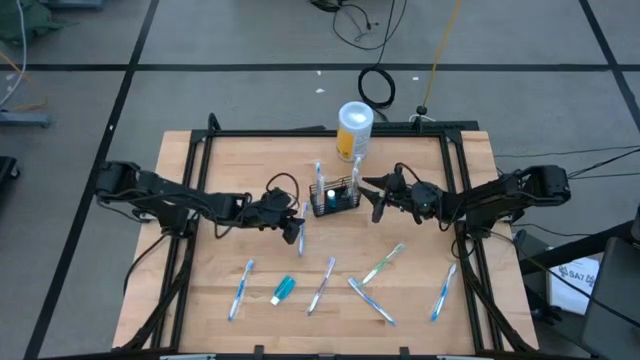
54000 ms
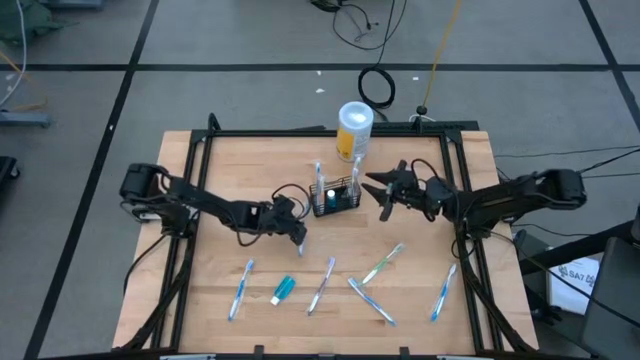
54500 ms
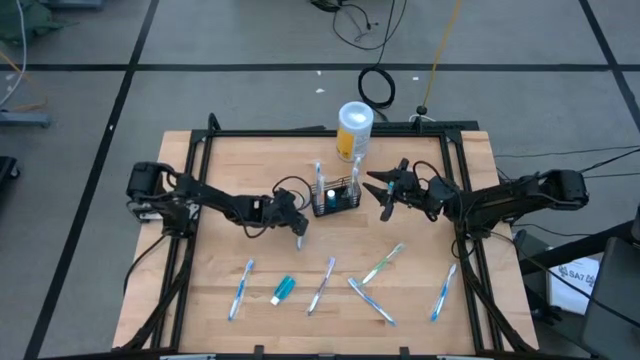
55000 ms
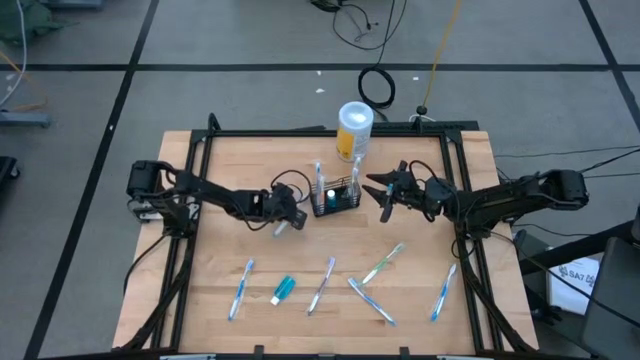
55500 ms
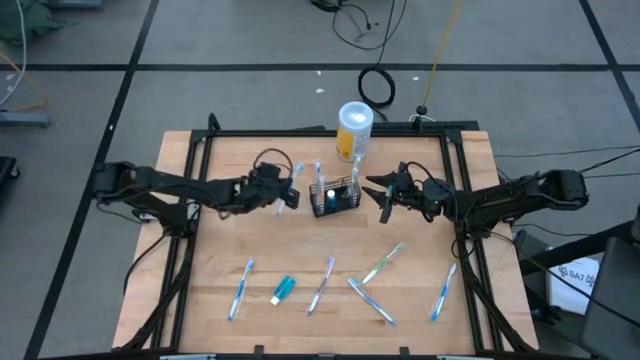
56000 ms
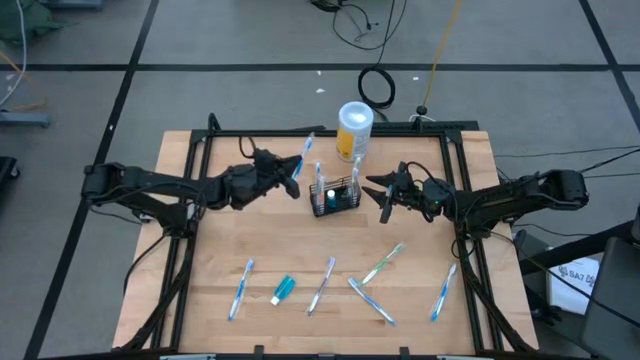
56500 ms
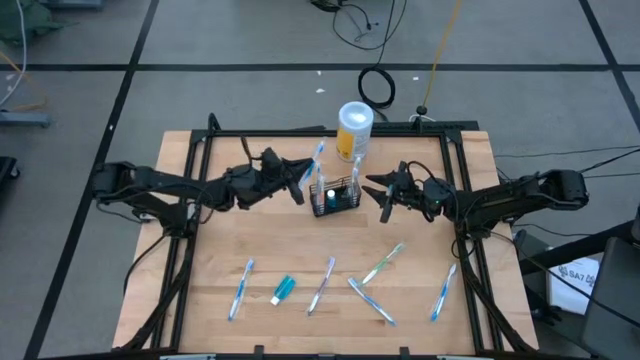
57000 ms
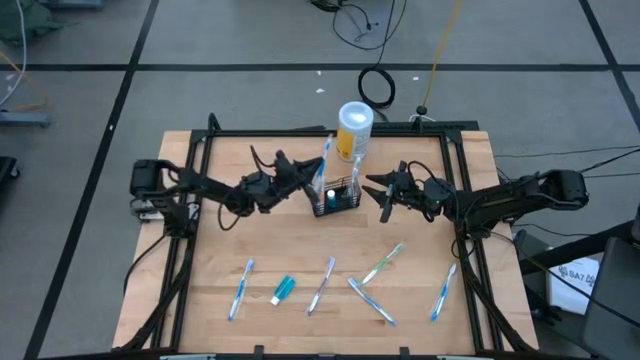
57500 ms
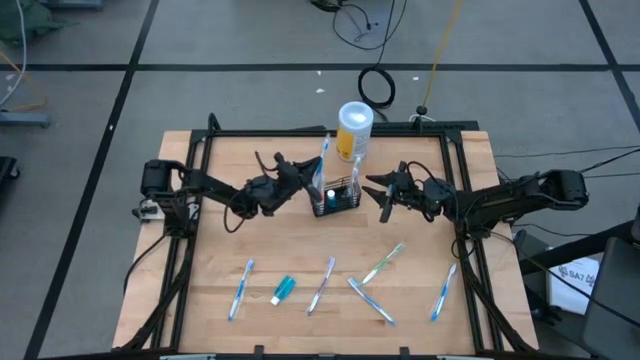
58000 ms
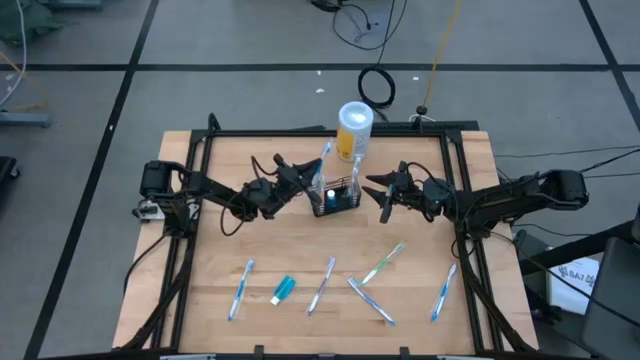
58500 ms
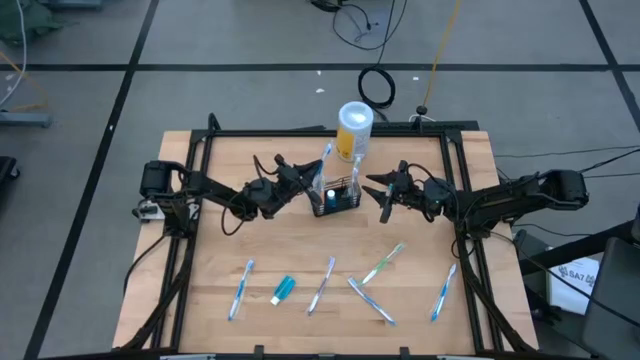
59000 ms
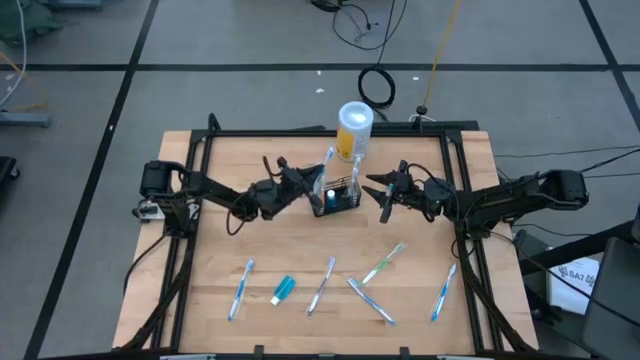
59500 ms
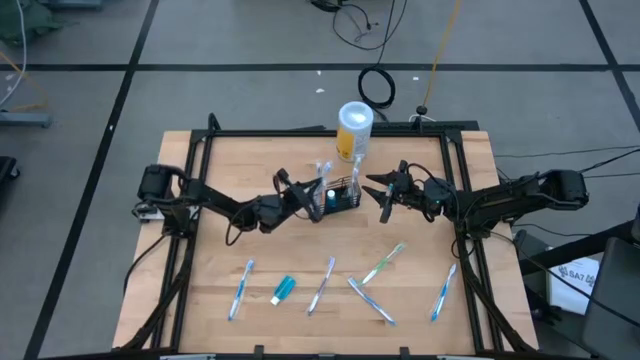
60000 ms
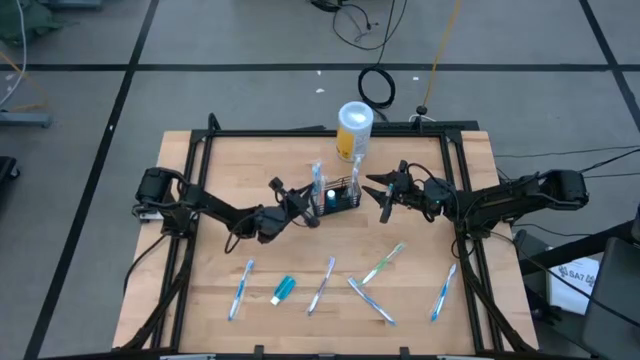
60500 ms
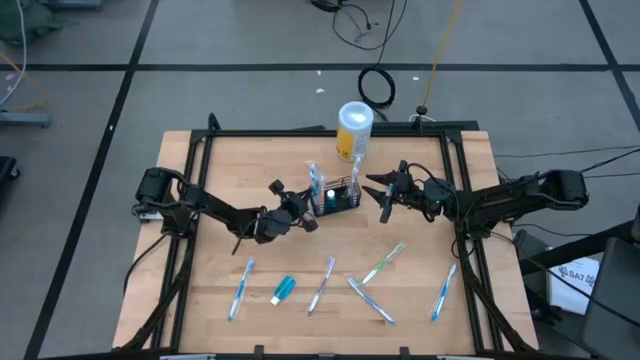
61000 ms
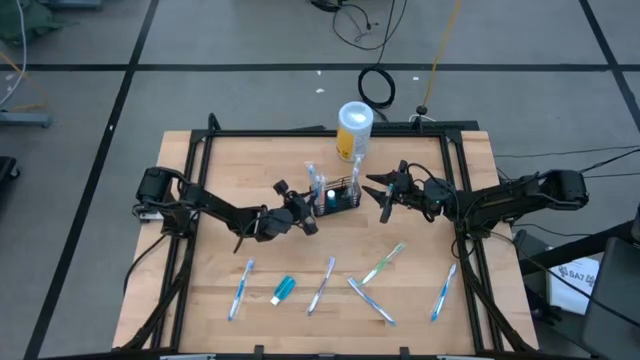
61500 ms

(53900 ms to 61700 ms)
Task: Pick & Place toothbrushing station
Put the blue toothbrush into the black wire organizer

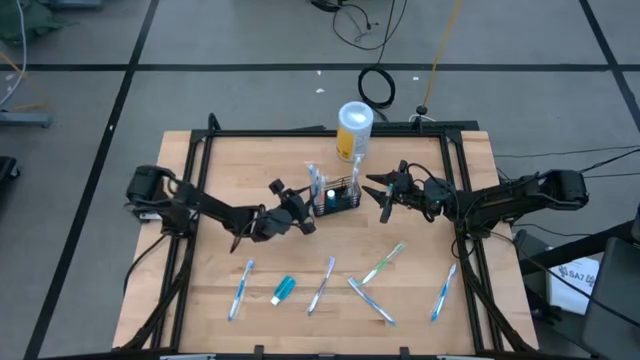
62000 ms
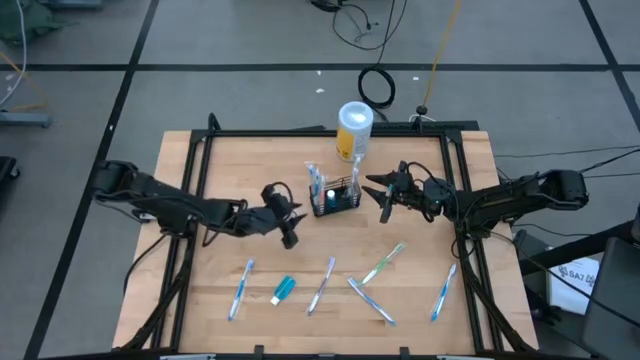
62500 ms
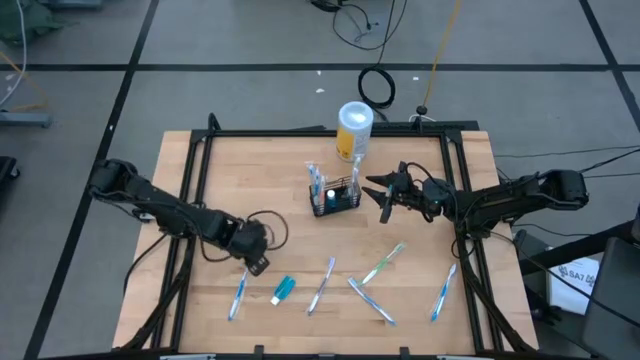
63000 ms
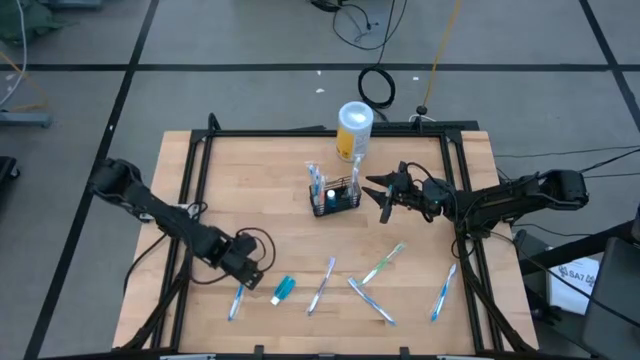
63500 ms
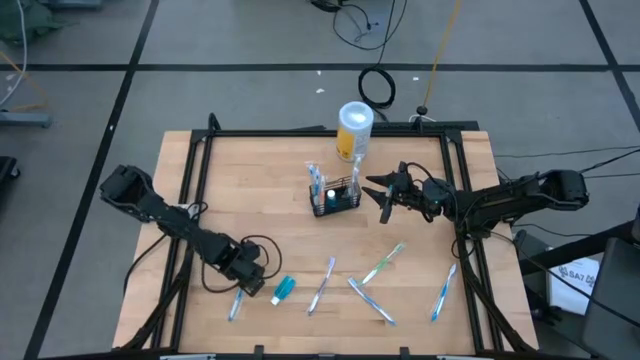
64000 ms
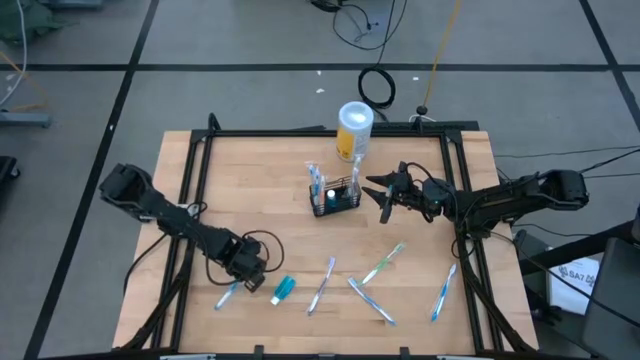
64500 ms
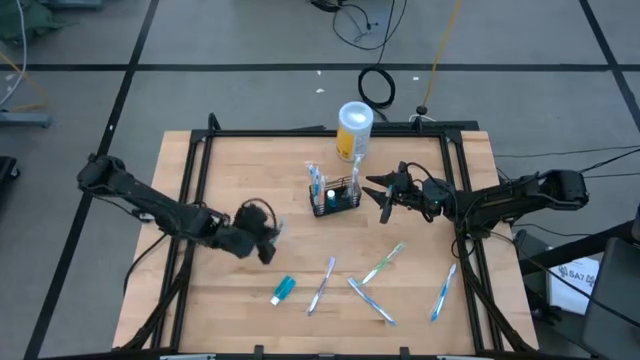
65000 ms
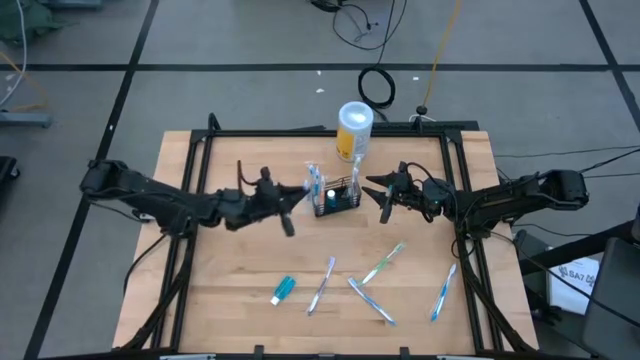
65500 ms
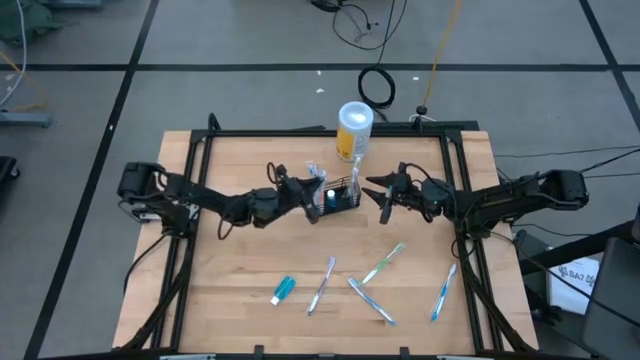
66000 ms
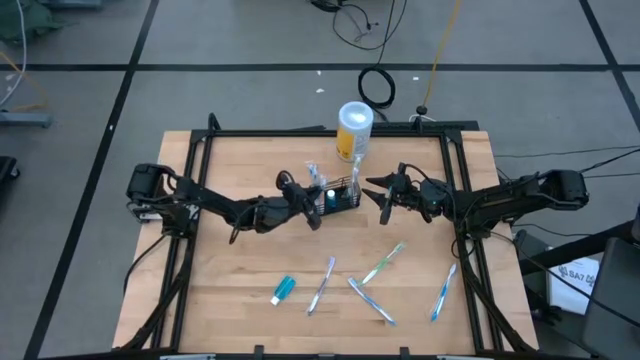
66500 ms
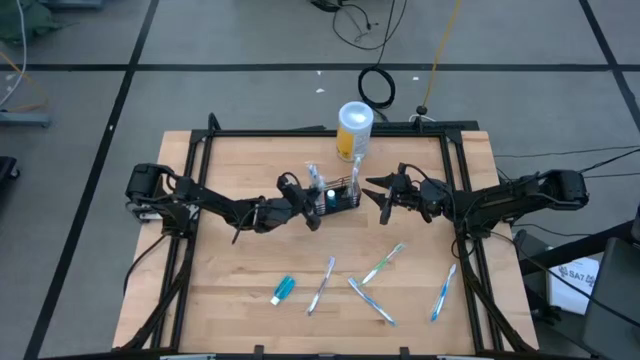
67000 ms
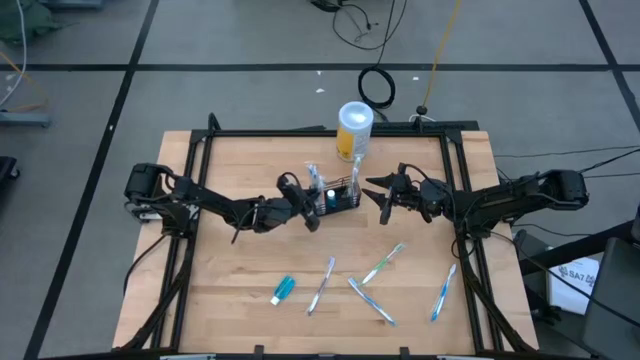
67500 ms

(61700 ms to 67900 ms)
Put the blue toothbrush into the black wire organizer

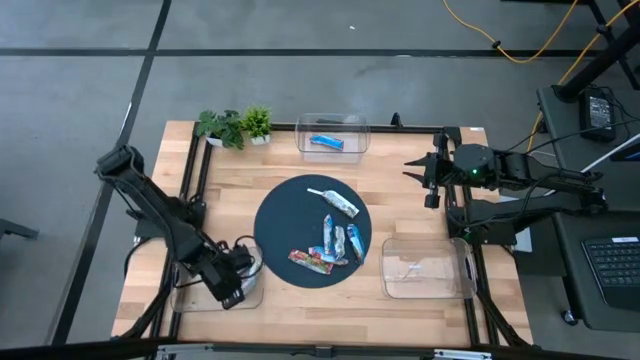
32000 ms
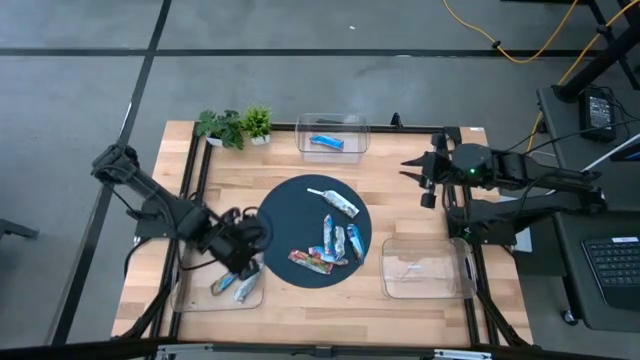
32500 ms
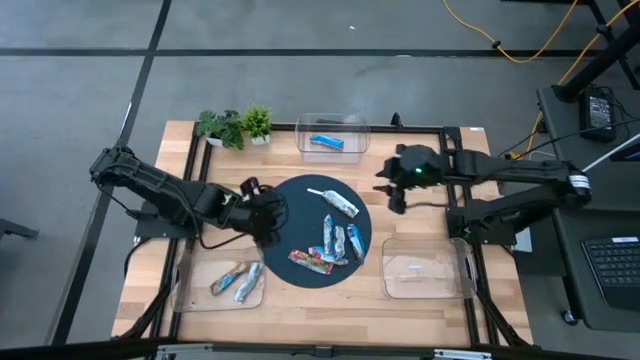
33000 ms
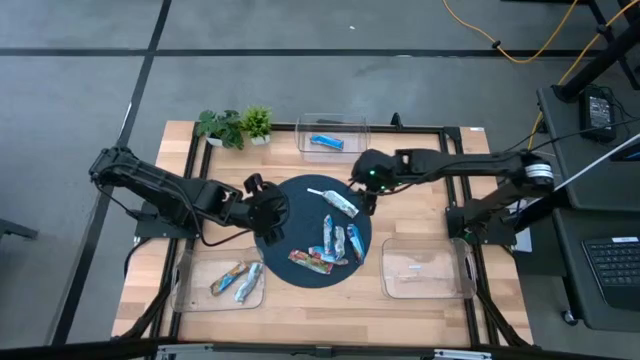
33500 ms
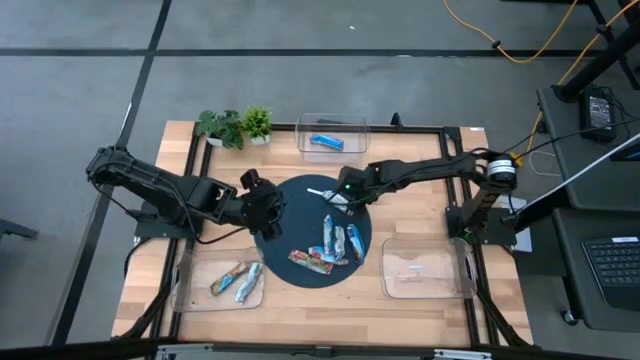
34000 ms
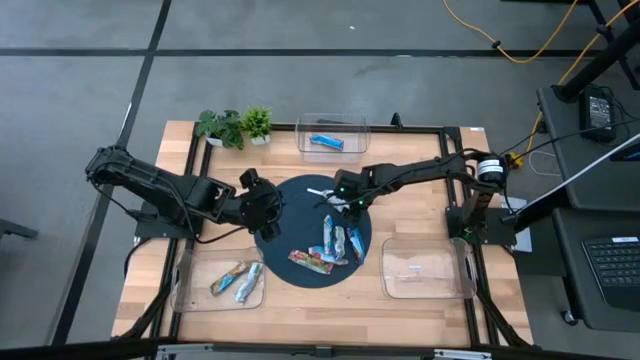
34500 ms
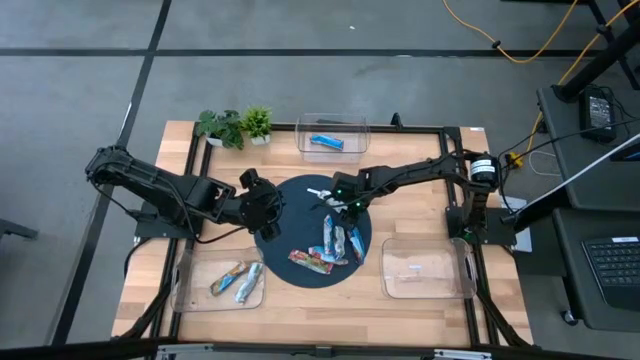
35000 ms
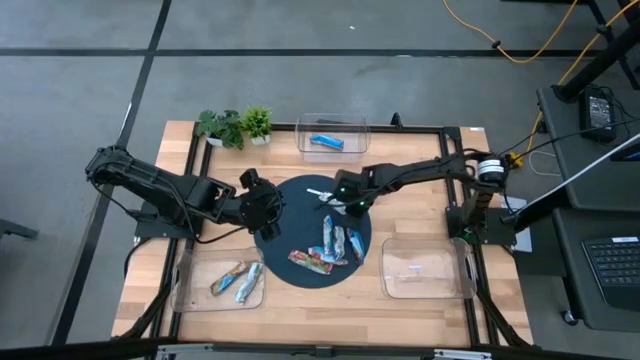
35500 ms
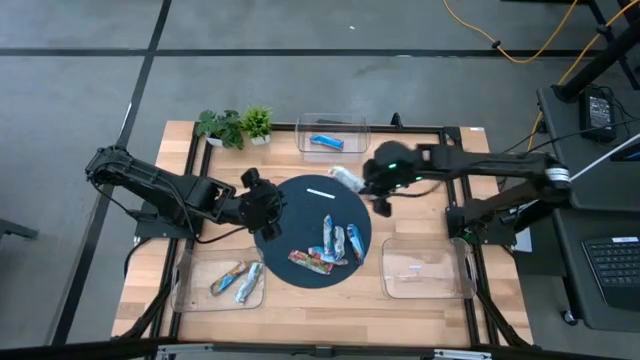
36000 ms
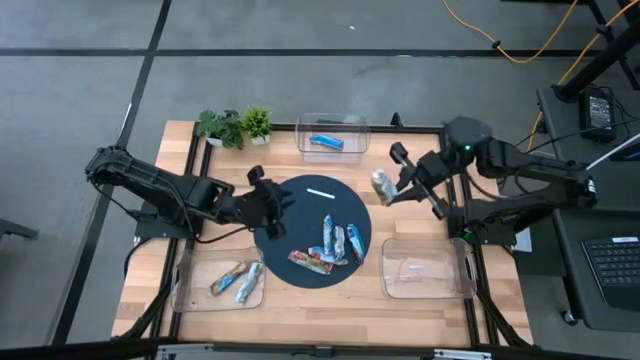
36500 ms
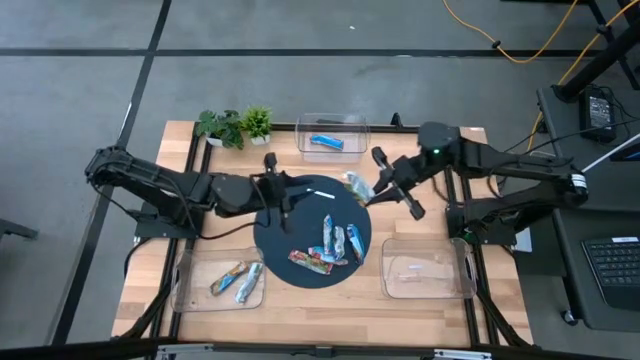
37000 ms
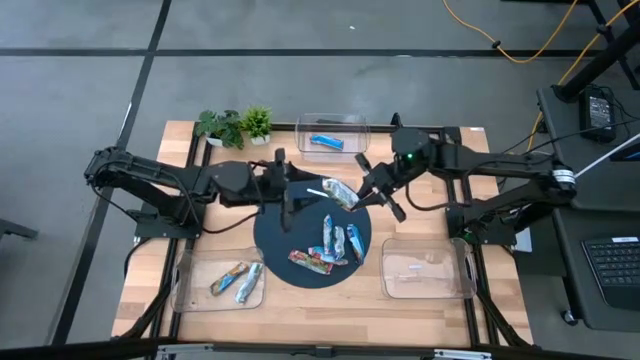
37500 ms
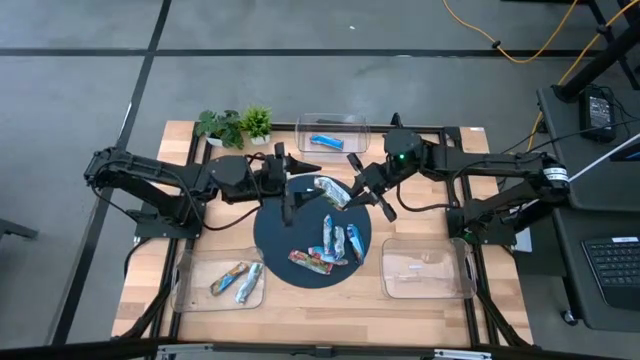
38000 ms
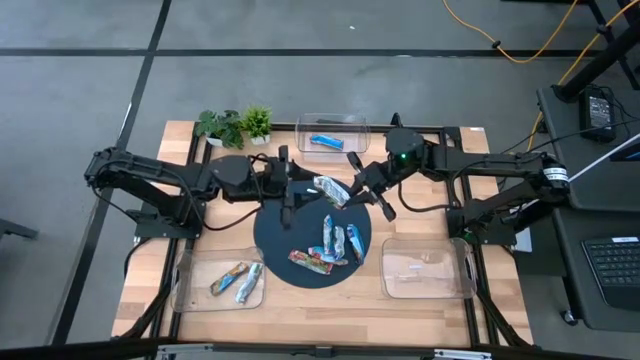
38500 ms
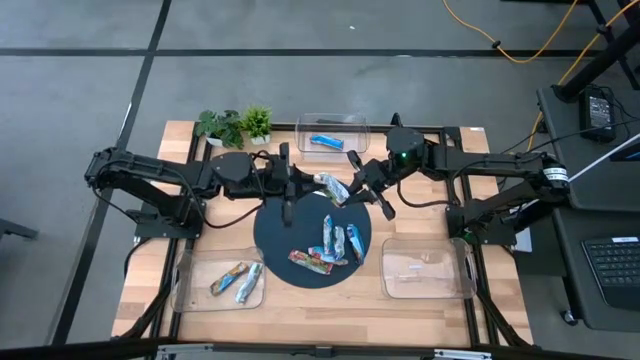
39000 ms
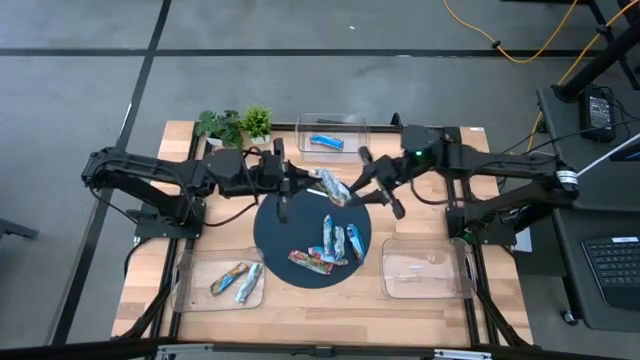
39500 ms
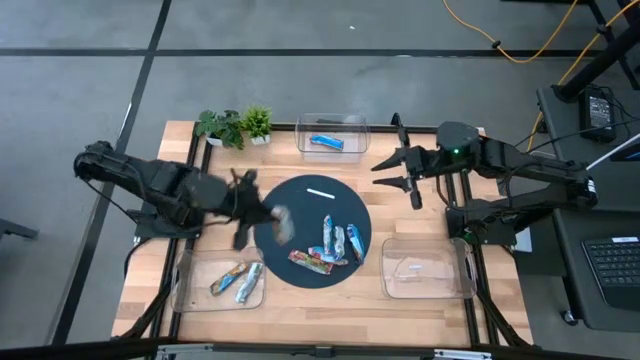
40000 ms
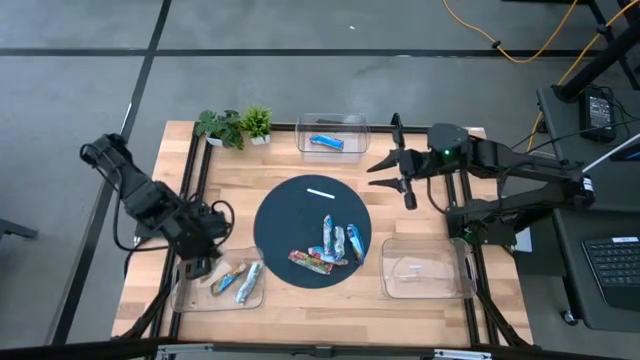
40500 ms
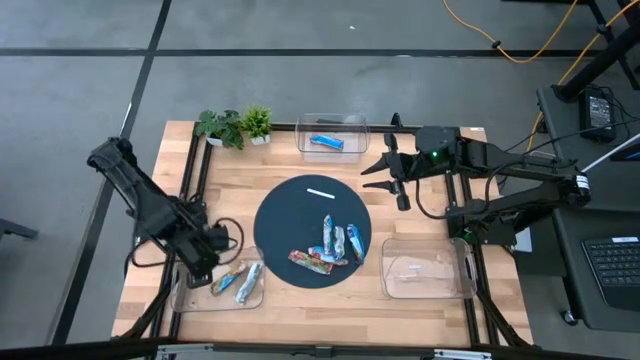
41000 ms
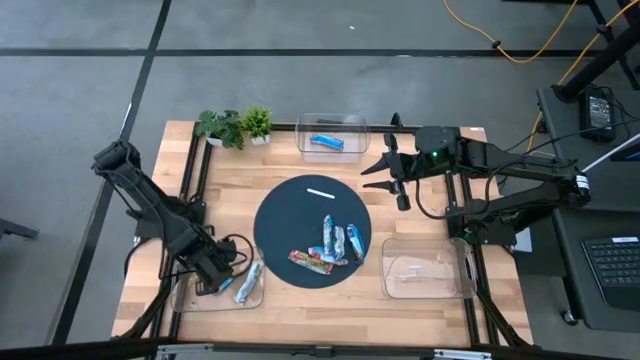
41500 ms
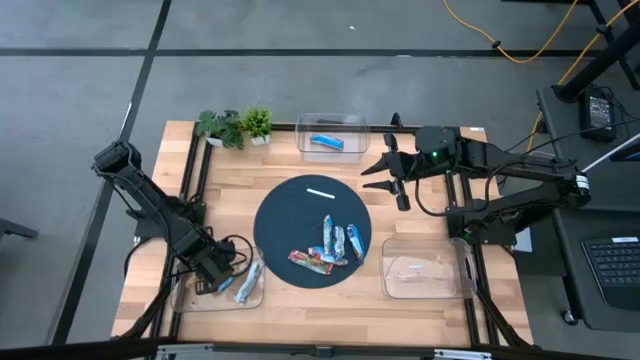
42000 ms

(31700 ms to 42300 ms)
Task: Pick and place Granola Bars by type
Put the orange granola bar into the bottom left transparent bin
